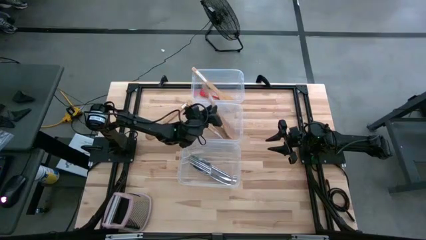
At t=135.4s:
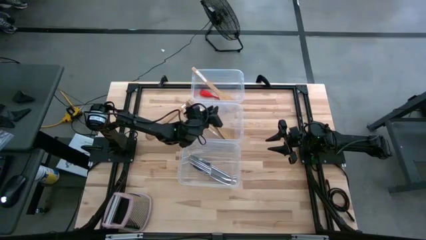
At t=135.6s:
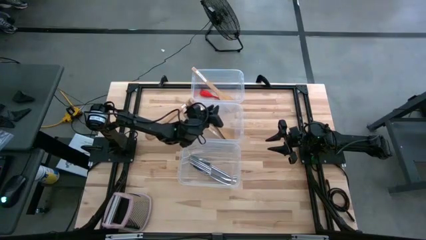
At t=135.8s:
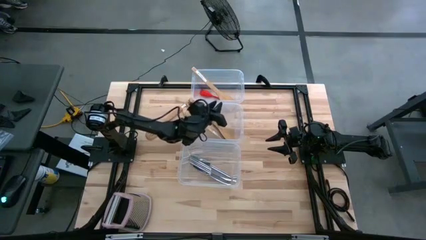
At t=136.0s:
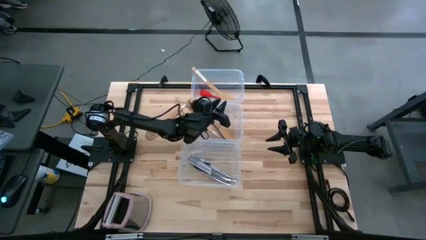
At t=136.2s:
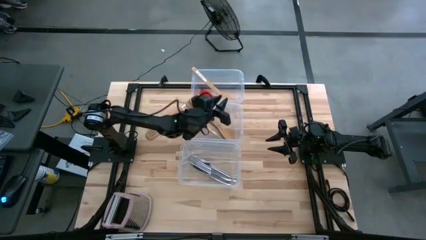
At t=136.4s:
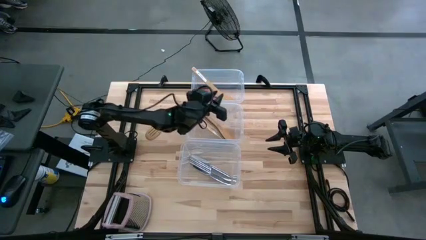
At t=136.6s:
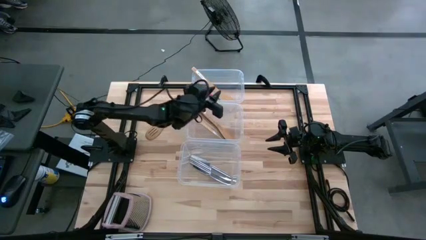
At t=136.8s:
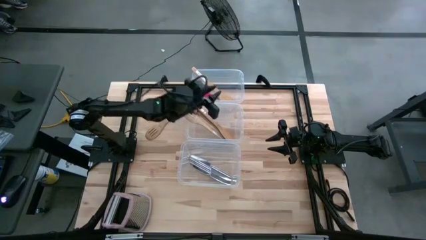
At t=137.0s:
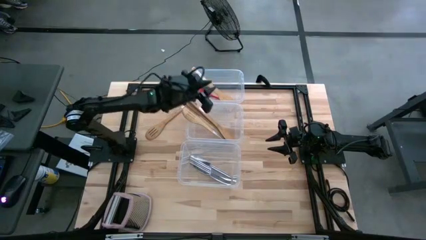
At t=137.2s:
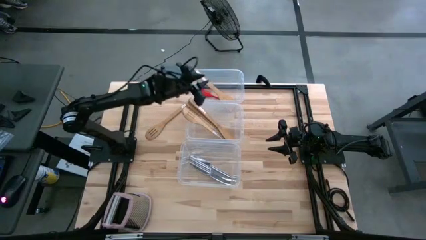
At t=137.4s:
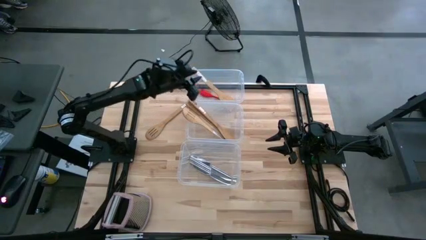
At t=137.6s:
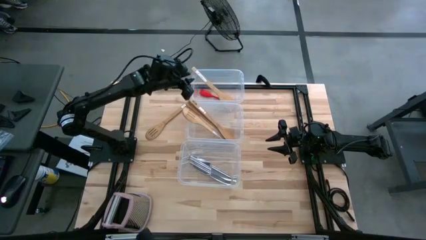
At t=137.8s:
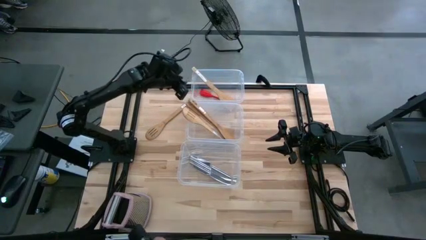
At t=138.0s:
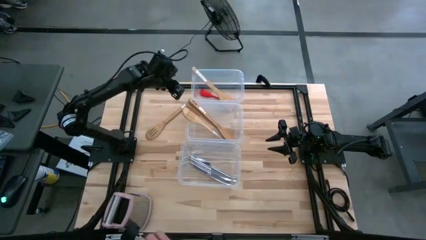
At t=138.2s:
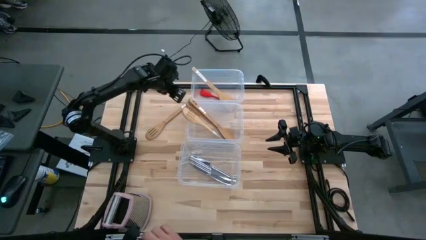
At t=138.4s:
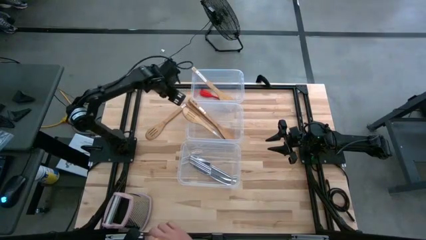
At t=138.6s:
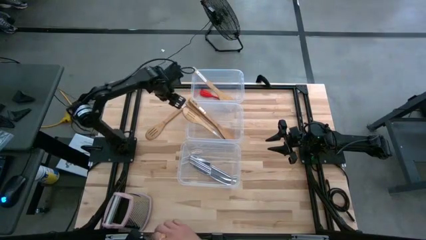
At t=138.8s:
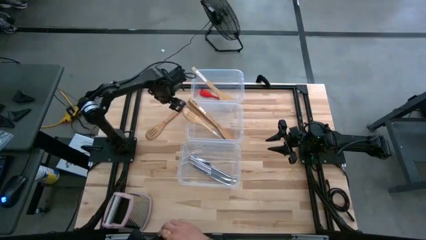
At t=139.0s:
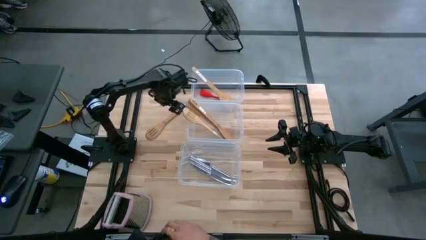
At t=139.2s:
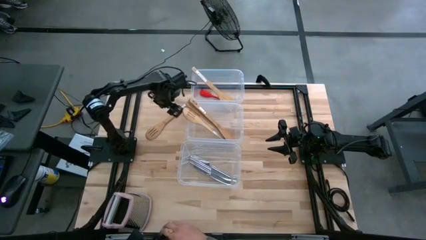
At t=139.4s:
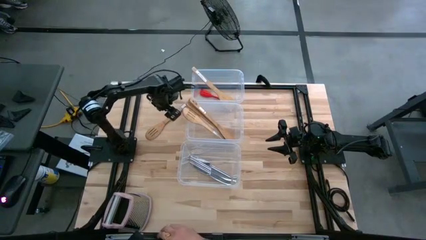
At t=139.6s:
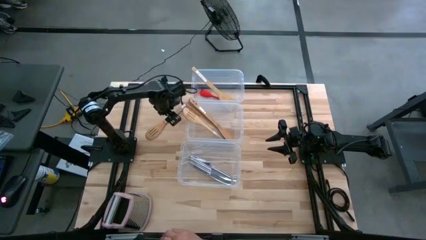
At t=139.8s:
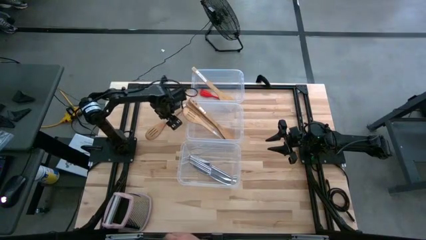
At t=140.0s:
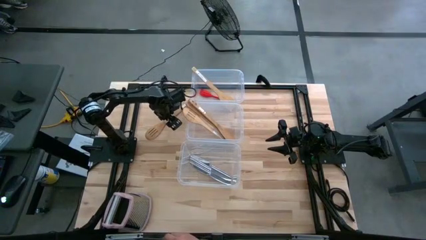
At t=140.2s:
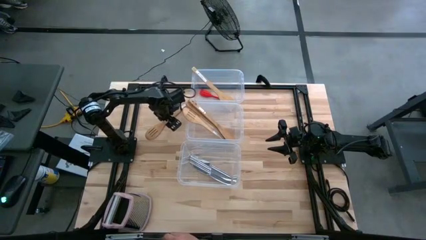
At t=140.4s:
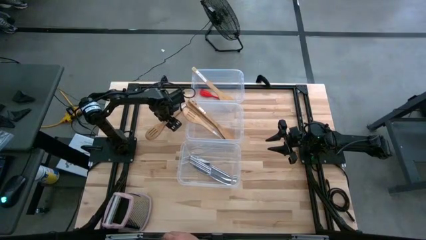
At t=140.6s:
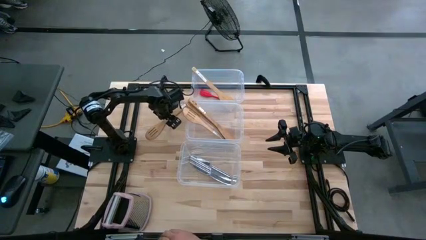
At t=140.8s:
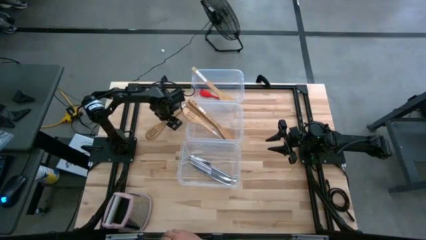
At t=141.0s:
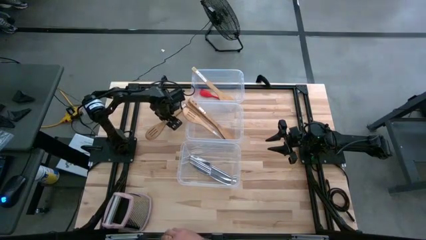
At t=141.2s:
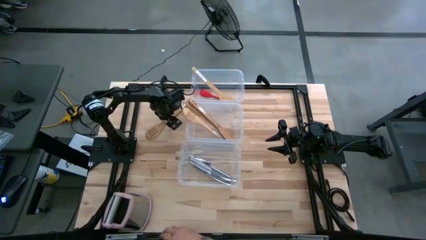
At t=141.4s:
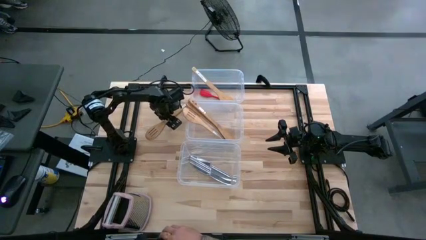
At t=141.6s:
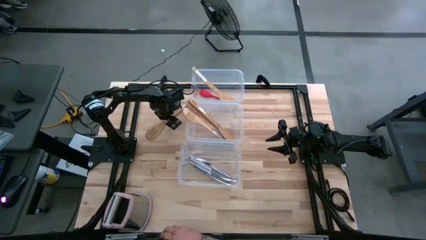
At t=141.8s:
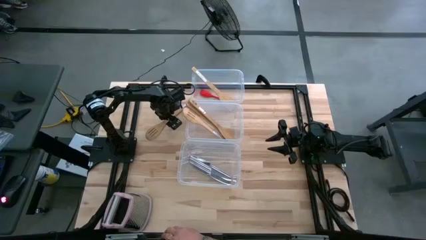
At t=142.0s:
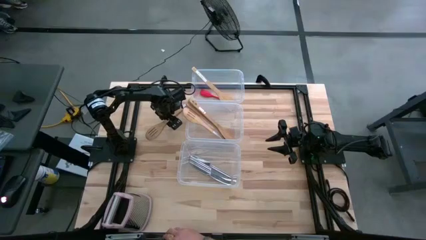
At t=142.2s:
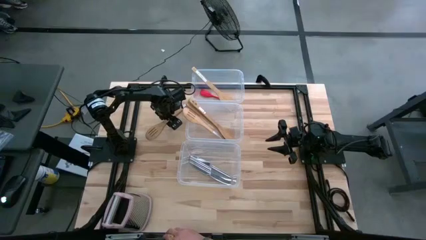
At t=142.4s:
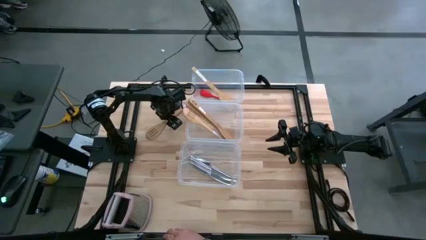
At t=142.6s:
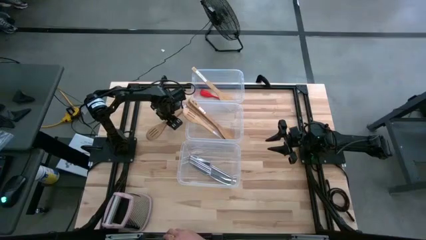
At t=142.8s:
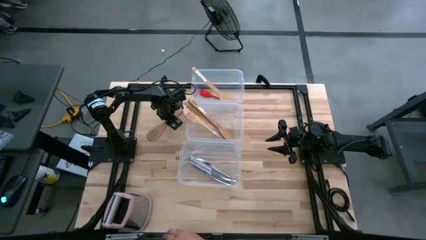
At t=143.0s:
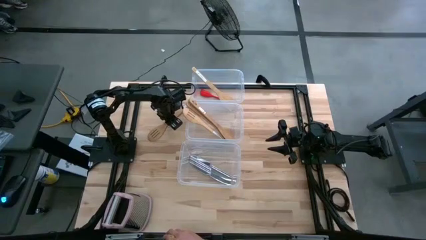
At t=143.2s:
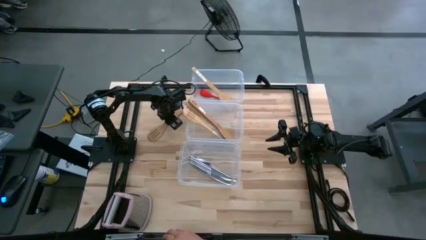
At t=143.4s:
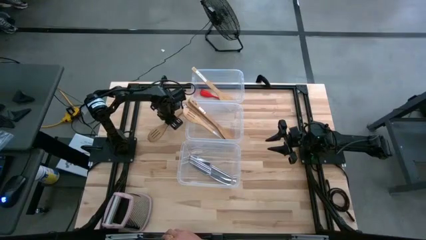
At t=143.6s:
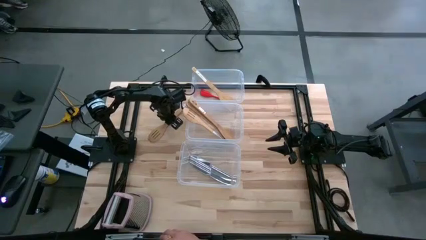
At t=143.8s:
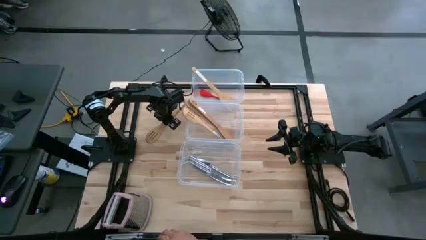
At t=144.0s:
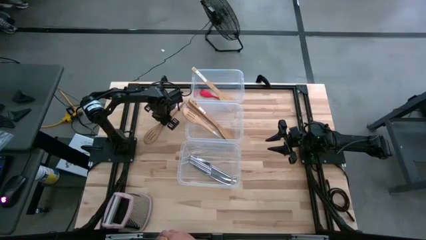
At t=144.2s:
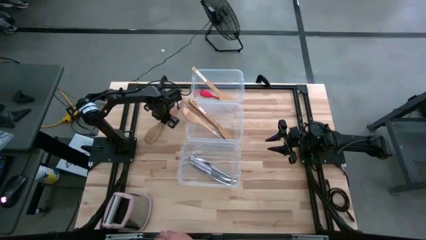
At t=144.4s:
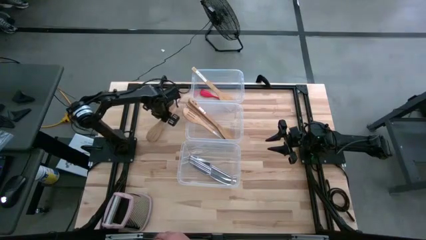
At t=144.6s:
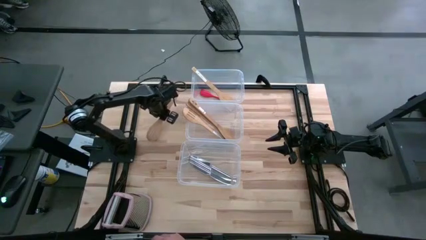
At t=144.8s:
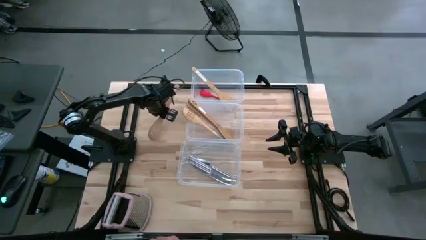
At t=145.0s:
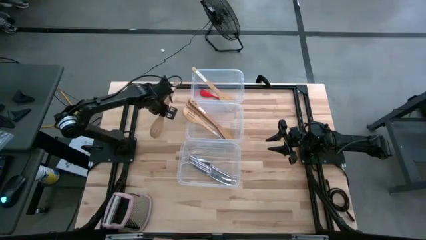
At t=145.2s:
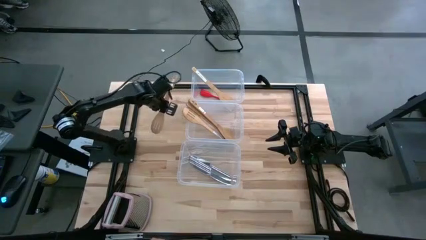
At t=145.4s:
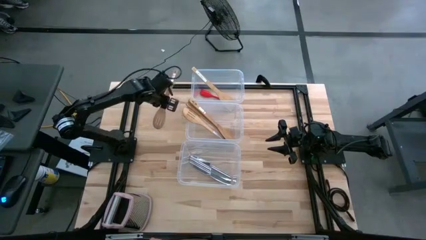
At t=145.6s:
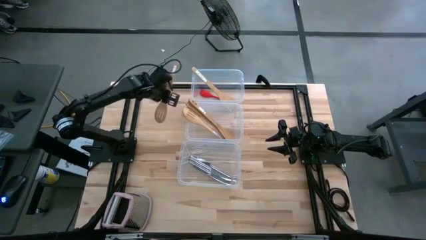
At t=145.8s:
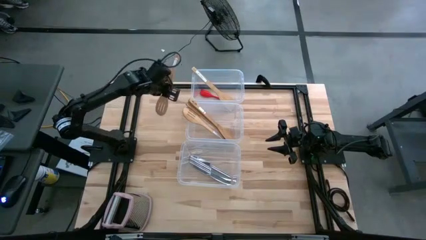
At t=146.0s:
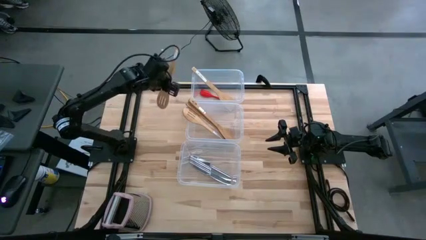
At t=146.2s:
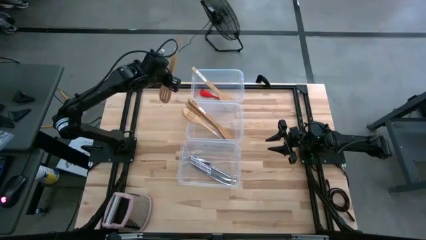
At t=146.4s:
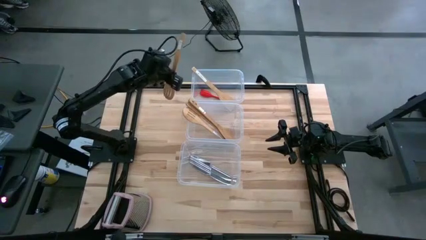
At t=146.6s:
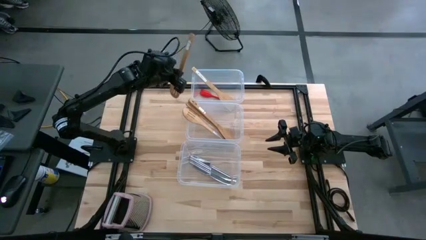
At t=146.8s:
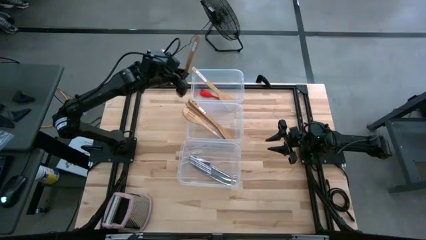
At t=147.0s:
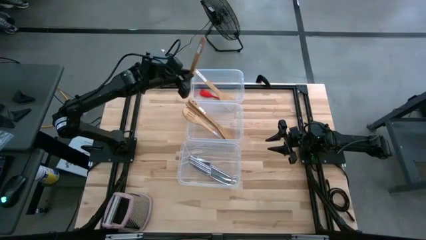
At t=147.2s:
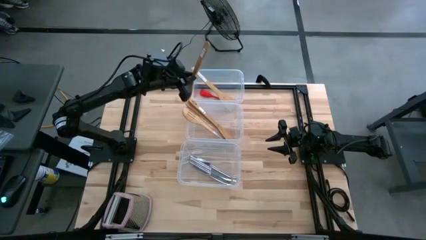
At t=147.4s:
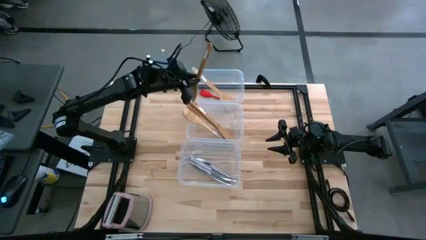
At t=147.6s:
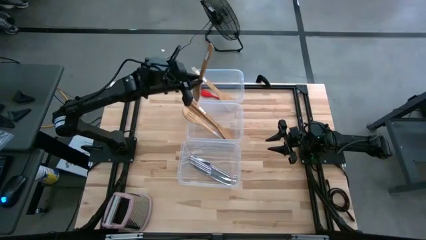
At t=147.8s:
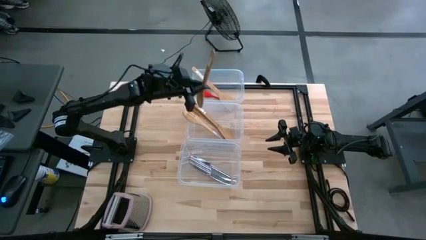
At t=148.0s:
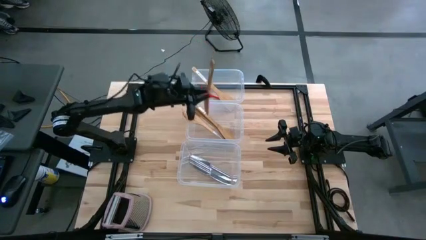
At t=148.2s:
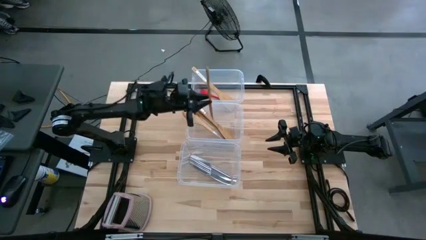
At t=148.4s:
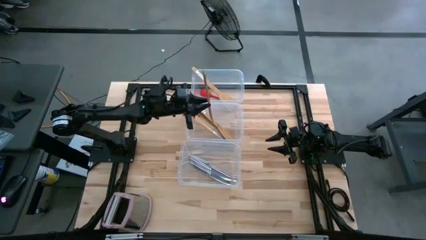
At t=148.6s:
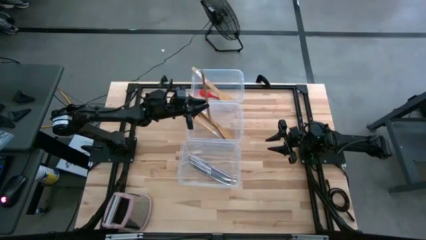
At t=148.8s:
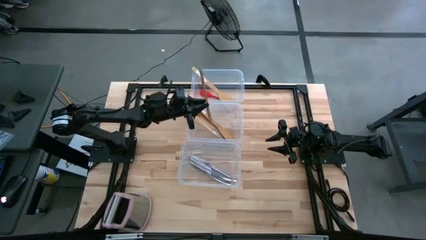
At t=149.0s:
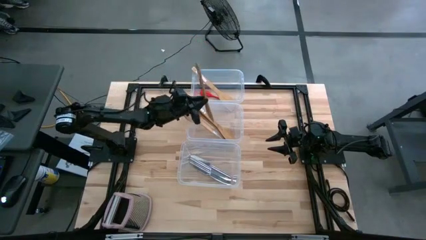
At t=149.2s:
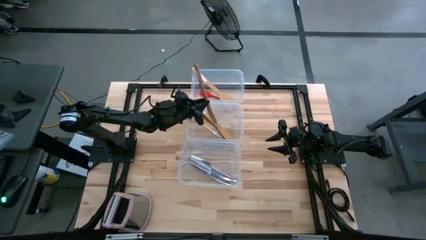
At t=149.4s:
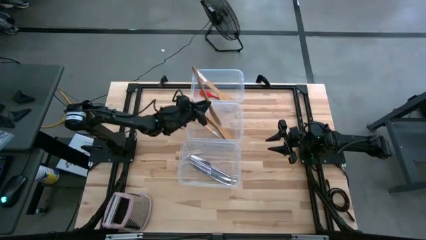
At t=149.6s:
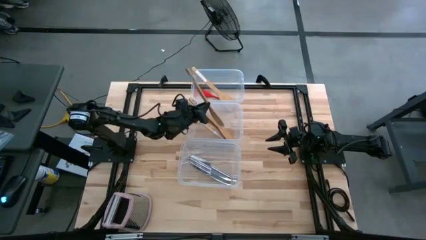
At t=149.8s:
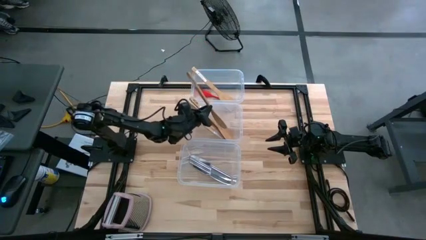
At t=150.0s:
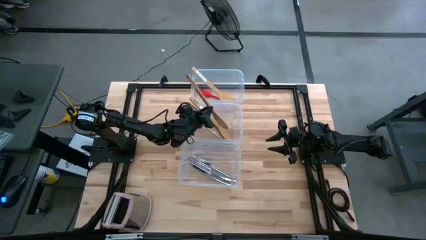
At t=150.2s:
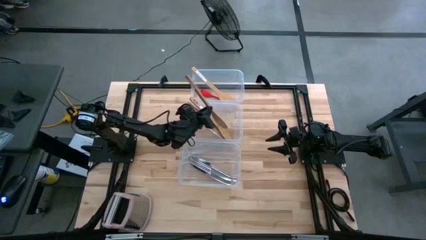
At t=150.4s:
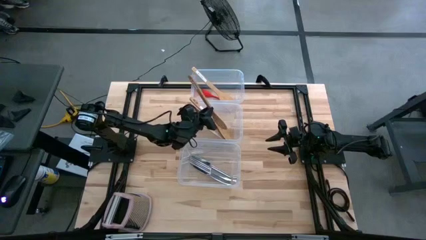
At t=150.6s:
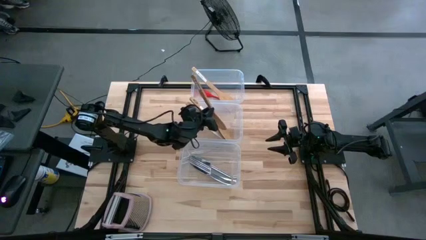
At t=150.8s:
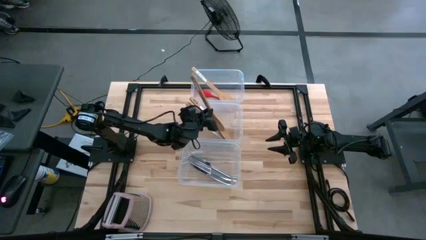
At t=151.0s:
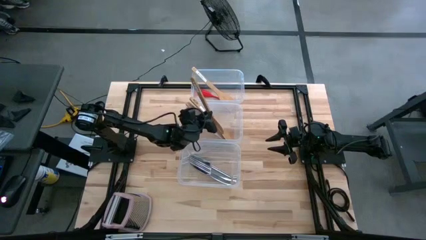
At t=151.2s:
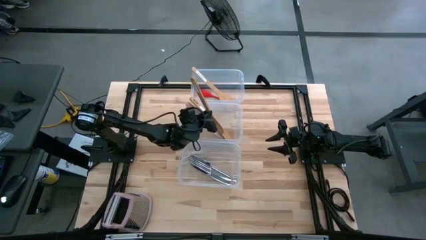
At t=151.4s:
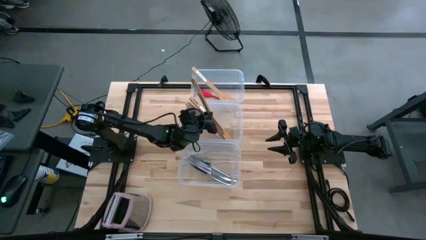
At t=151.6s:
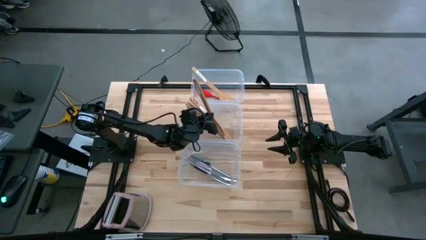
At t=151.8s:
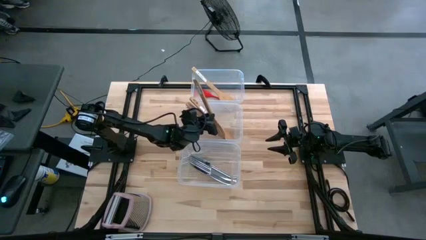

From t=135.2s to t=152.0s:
Task: Pick & Place Kitchen Items
Put the brown spatula into the middle transparent bin
